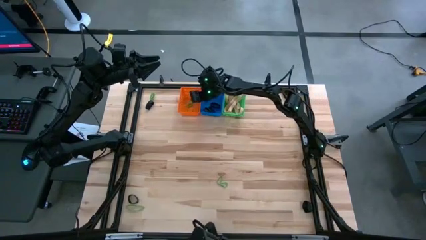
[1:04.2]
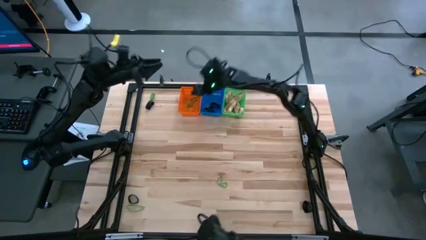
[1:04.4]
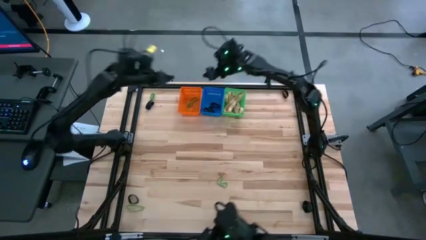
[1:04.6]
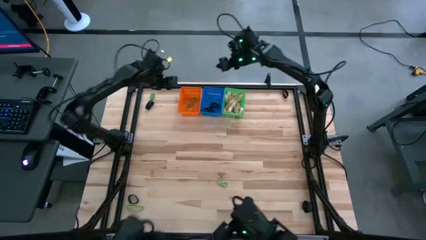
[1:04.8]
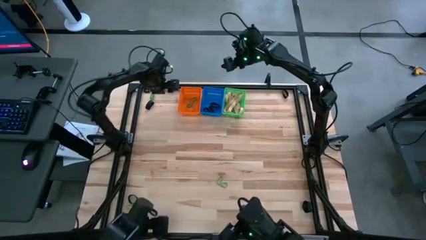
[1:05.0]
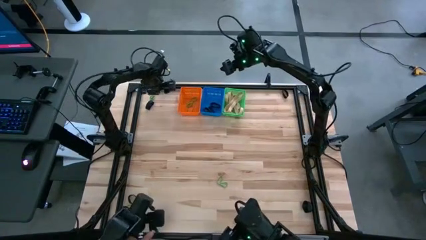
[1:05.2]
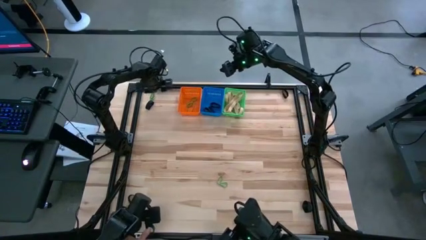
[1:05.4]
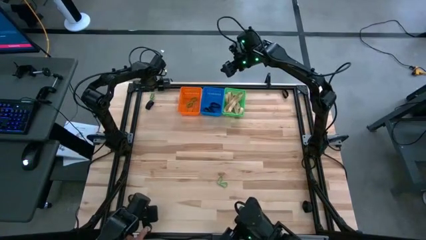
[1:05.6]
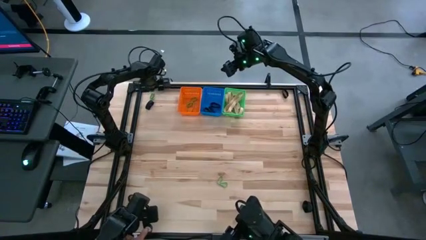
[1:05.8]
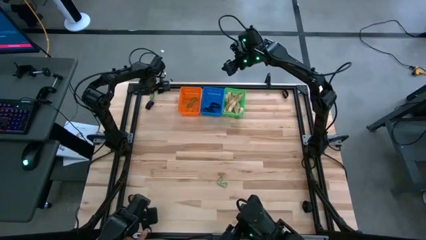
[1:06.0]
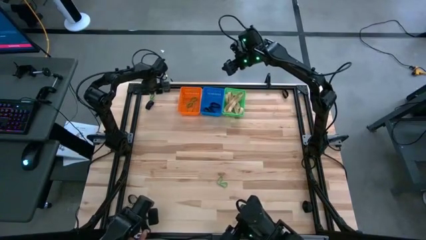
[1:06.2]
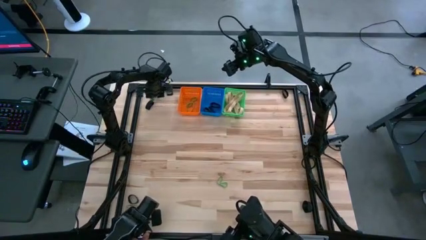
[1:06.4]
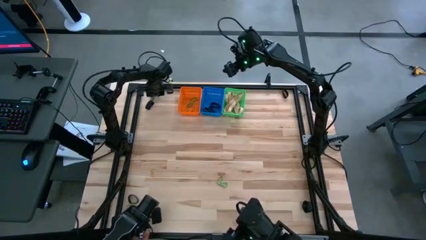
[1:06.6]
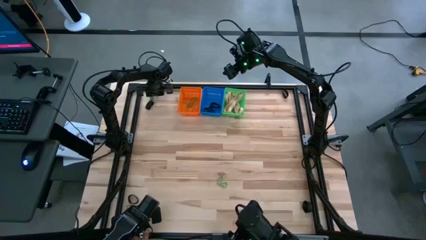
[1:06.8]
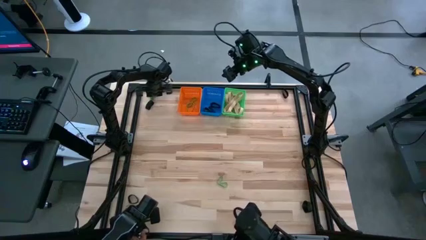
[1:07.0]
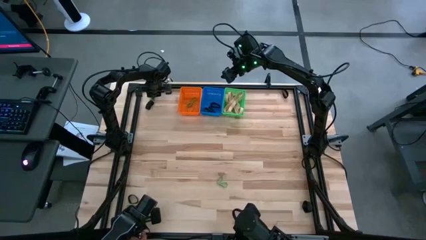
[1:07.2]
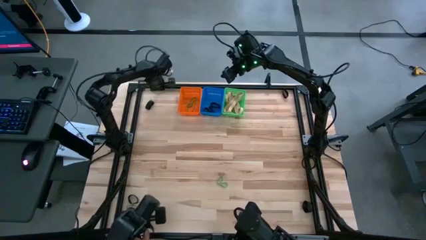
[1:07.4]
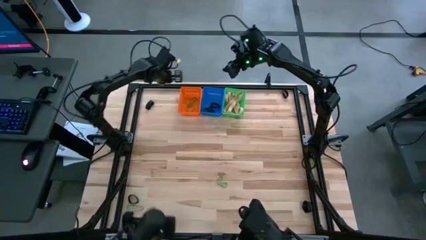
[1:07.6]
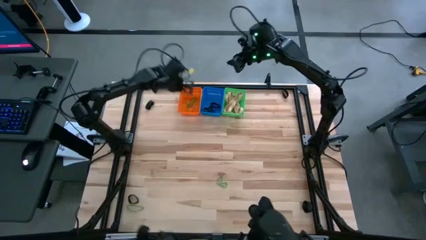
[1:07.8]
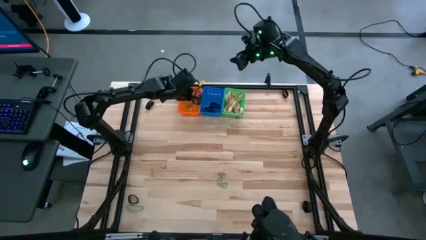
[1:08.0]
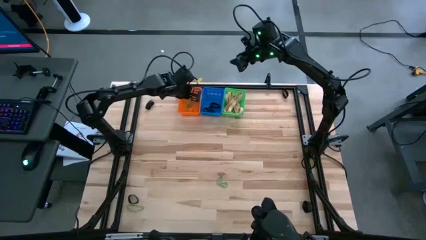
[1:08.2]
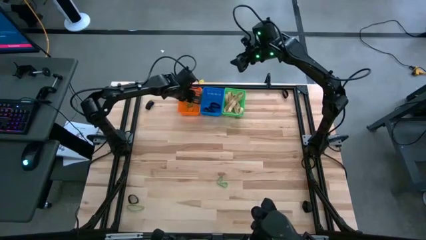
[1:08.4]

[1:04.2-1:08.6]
Task: Sort rubber bands into baskets
Put the green rubber band into the orange bin

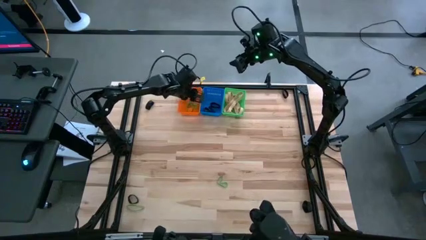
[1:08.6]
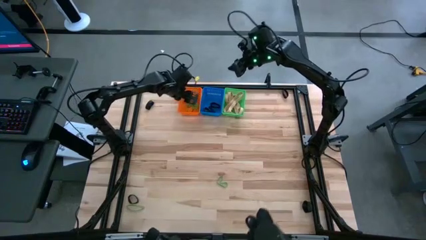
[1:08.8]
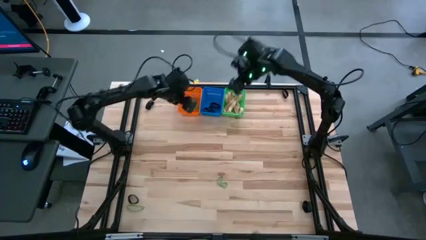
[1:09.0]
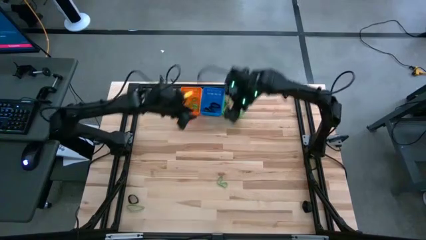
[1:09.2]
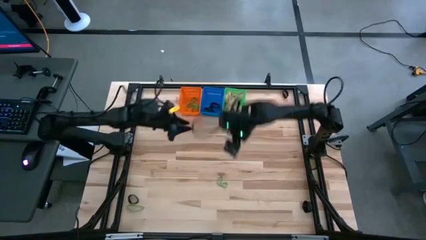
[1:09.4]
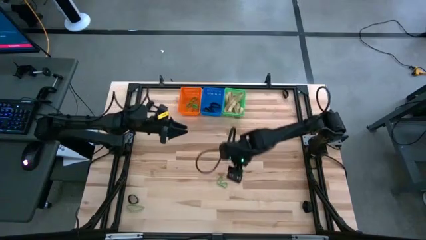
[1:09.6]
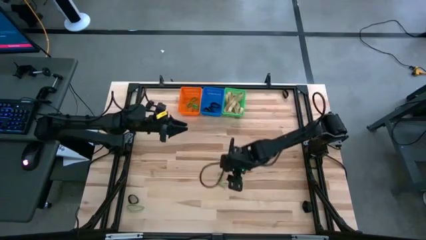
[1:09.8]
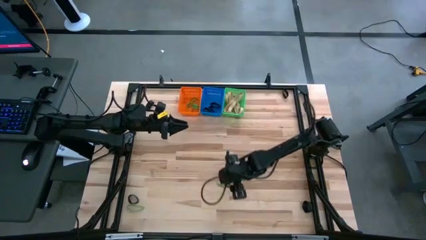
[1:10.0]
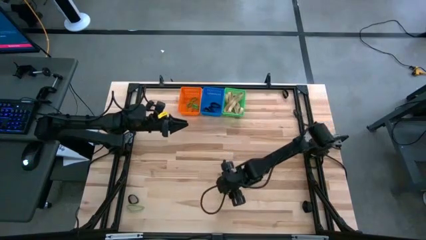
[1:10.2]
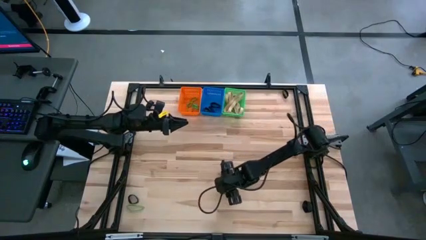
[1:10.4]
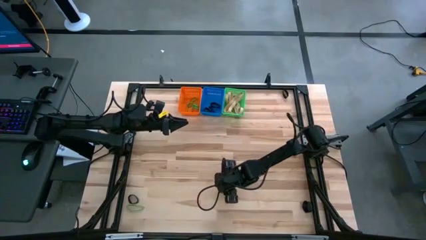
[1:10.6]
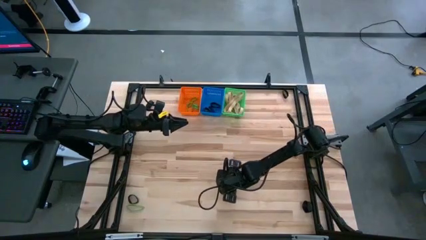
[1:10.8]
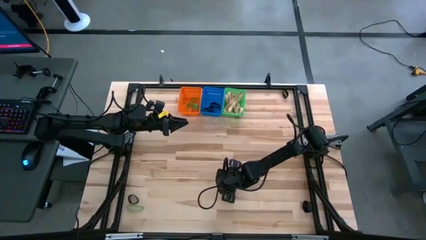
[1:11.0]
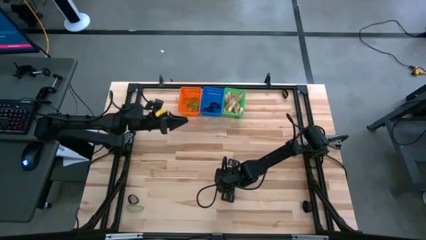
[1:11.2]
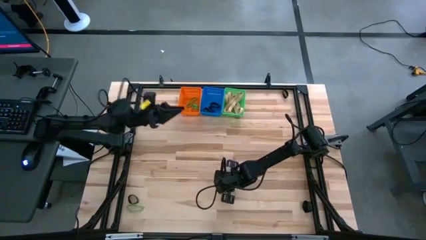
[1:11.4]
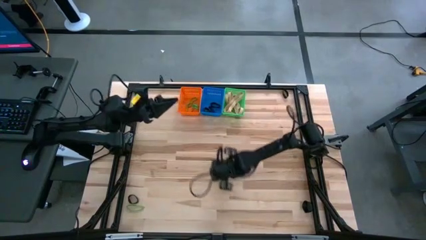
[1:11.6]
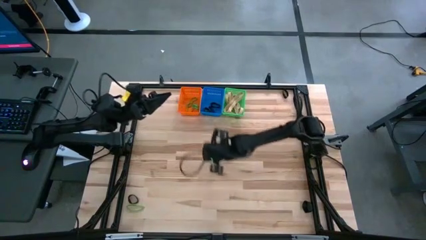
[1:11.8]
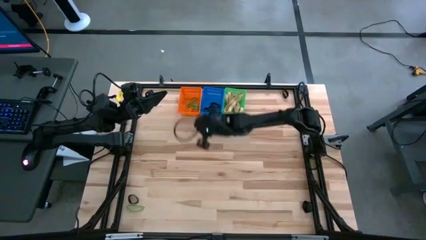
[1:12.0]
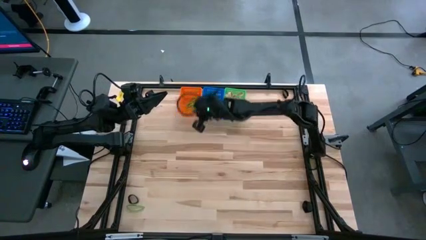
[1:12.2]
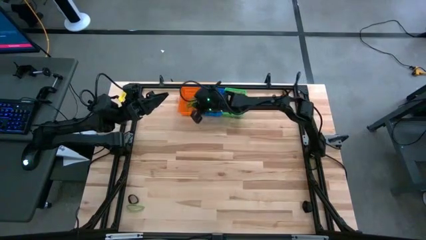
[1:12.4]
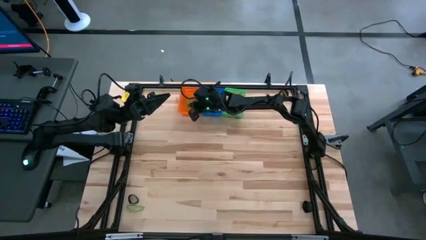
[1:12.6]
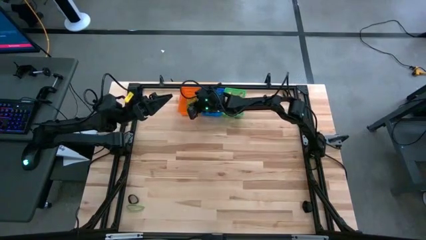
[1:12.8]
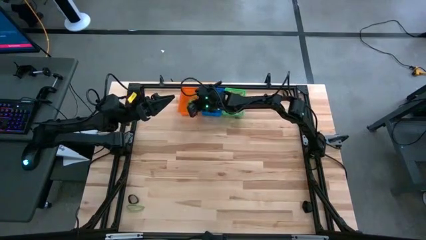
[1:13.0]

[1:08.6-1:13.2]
Put the green rubber band into the orange bin

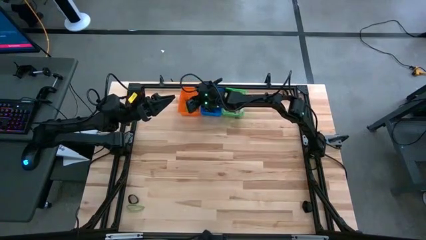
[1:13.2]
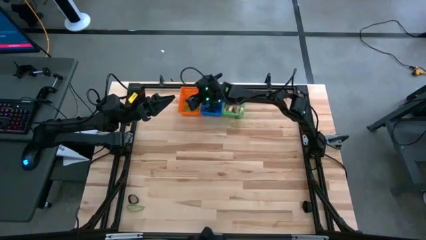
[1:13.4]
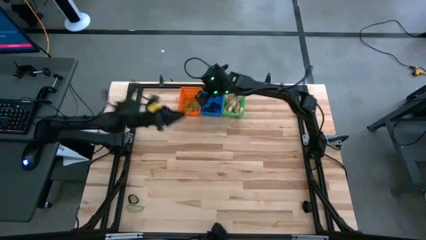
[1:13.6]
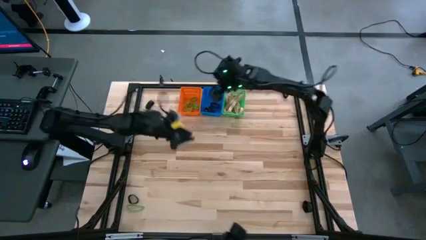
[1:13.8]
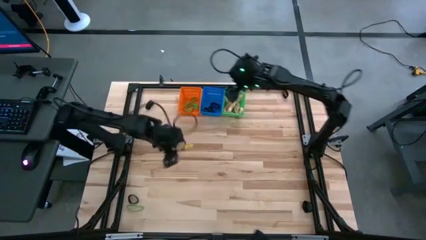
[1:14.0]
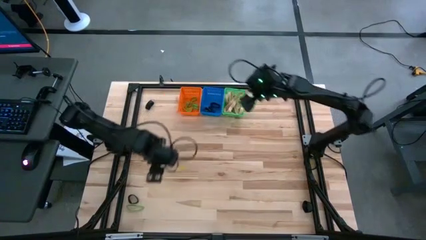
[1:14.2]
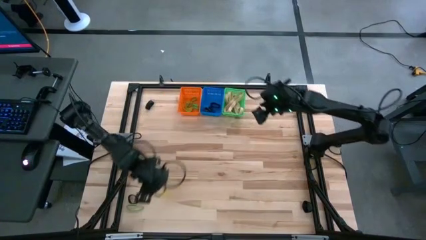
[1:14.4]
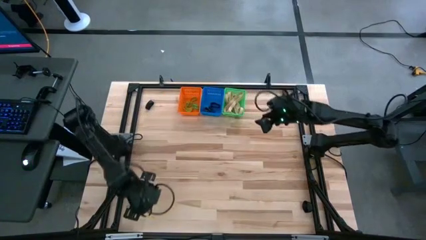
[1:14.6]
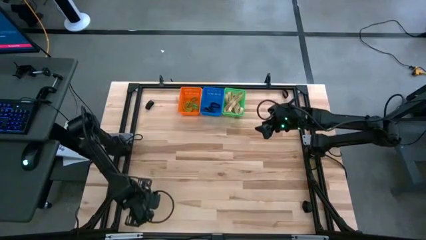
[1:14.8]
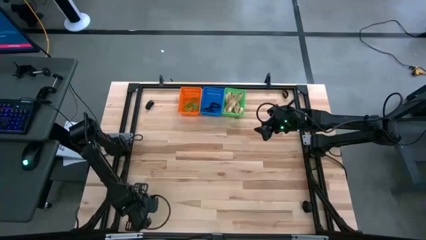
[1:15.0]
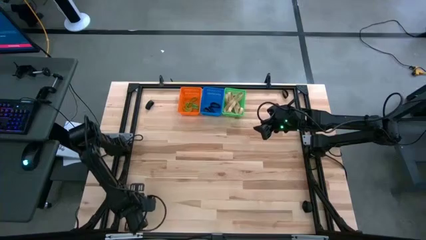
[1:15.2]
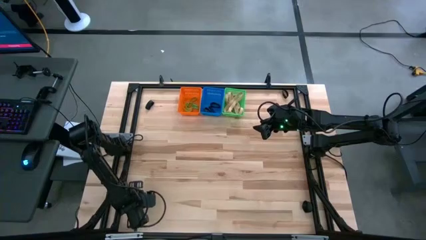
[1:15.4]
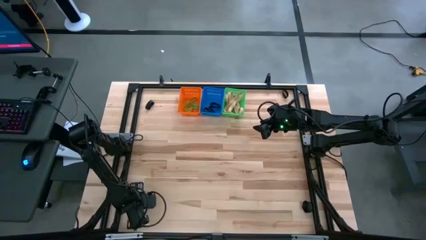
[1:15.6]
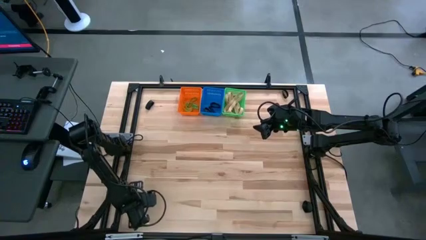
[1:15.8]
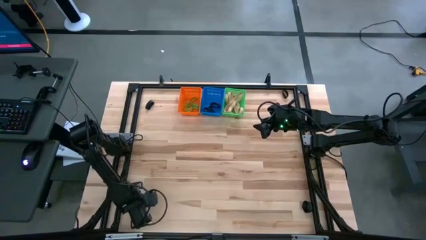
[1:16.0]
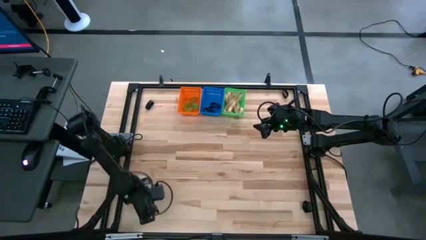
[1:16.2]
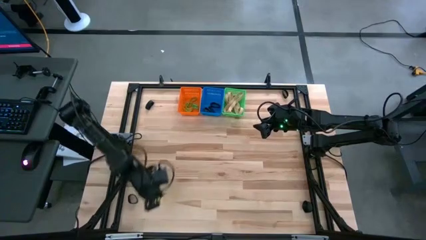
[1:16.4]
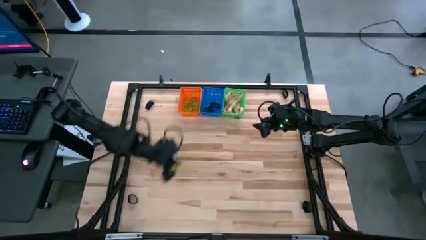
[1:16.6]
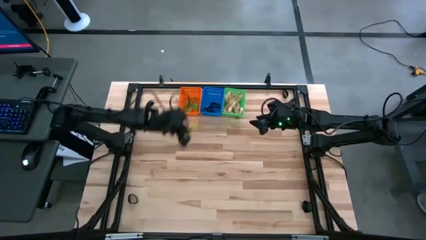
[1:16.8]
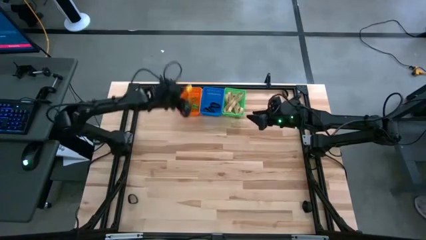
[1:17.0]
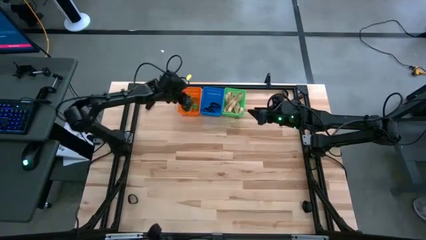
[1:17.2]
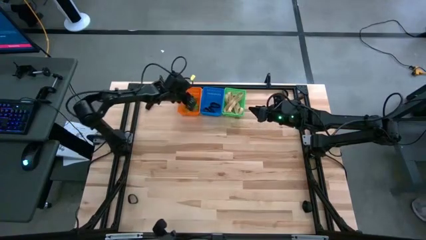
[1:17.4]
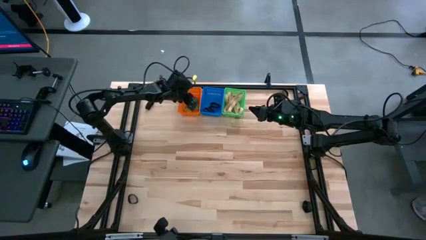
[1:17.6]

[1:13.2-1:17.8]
Put the green rubber band into the orange bin

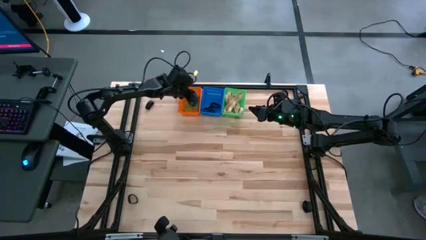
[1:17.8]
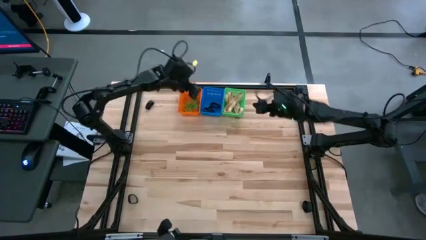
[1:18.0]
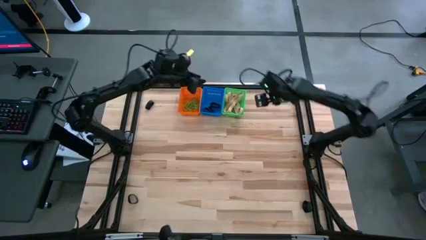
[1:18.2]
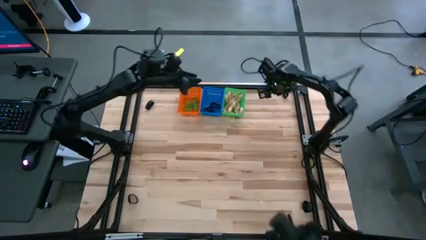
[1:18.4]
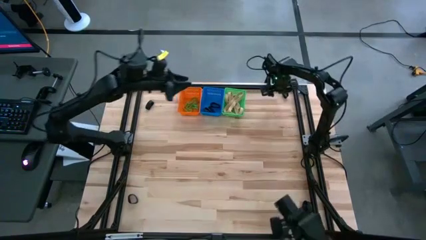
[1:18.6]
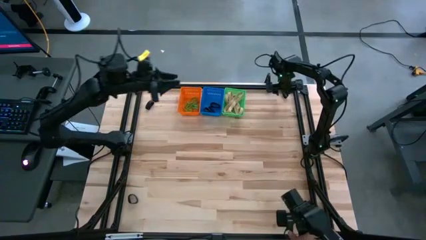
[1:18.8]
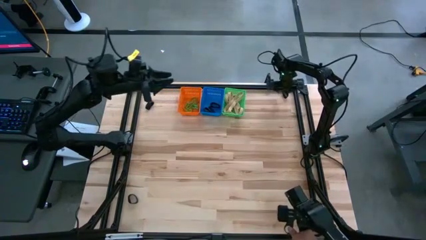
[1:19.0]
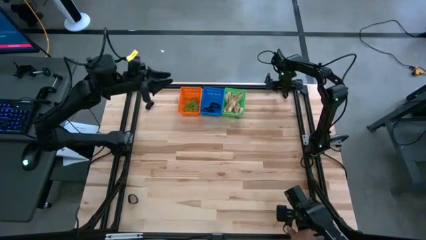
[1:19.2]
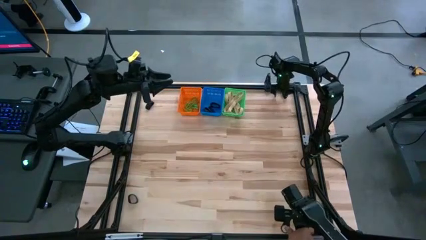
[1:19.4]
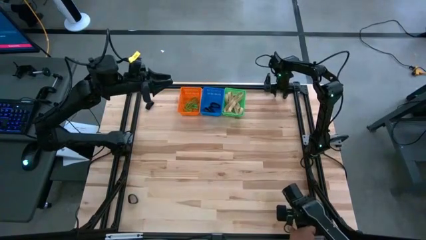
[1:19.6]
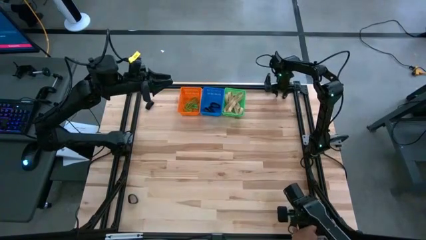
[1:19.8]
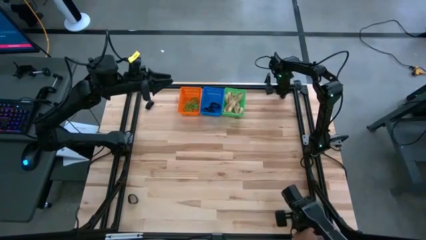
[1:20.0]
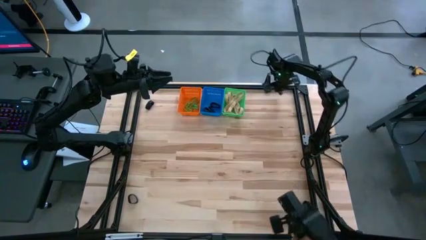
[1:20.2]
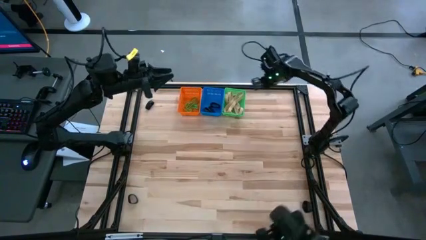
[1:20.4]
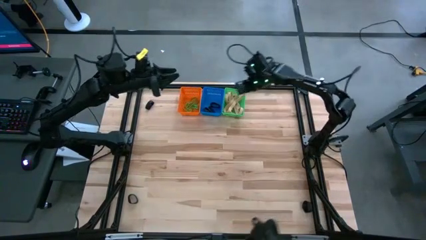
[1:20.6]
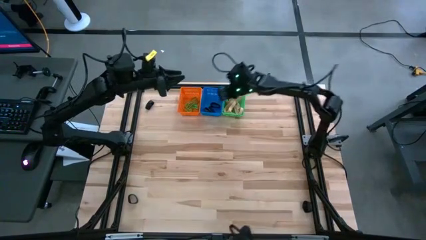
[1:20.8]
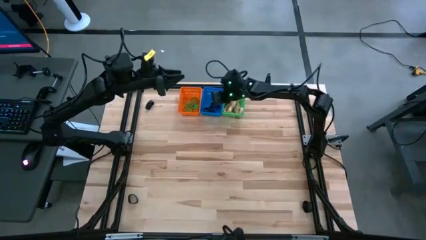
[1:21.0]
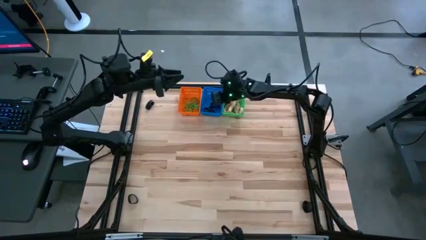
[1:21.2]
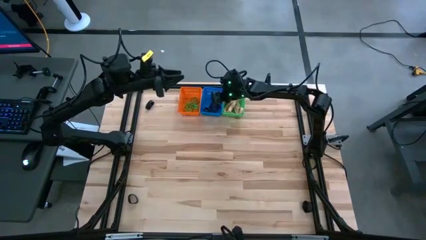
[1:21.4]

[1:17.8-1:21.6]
Put the black rubber band into the blue bin
